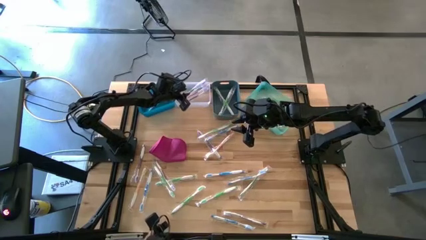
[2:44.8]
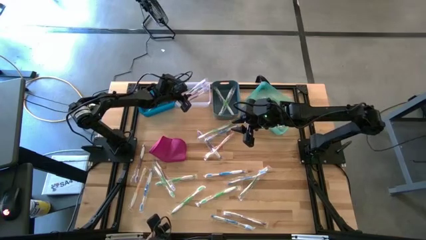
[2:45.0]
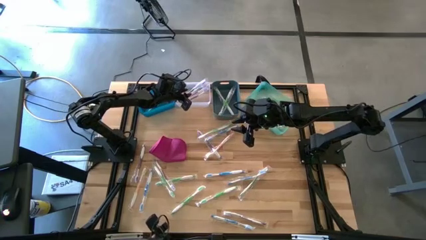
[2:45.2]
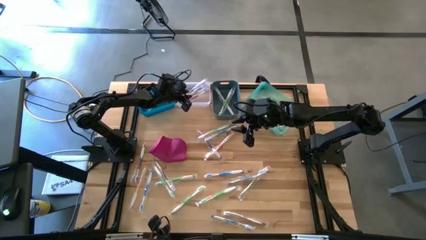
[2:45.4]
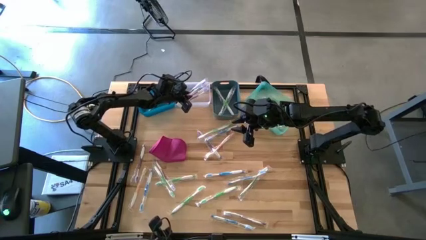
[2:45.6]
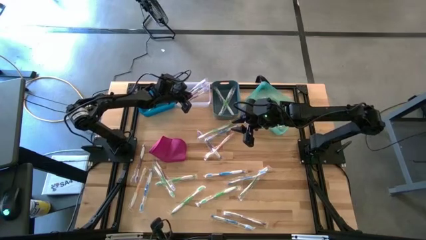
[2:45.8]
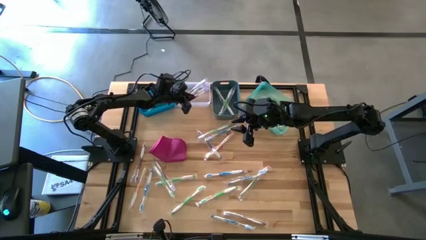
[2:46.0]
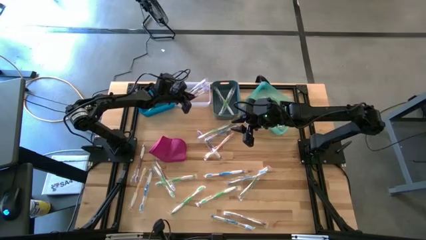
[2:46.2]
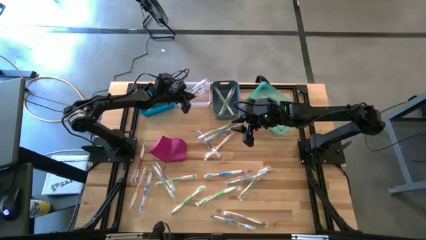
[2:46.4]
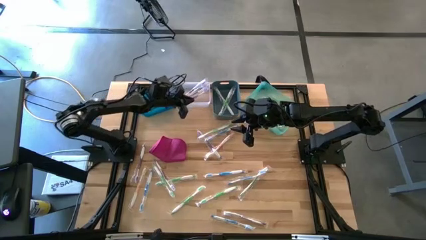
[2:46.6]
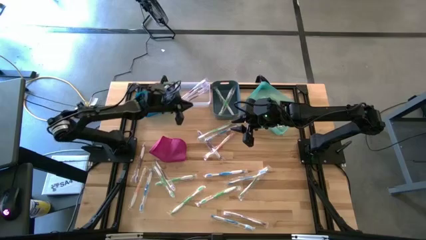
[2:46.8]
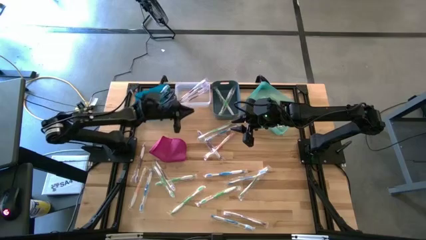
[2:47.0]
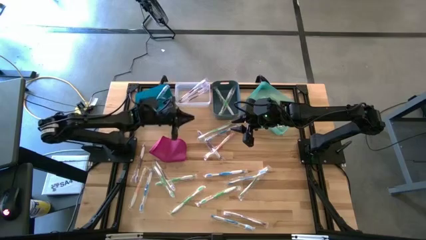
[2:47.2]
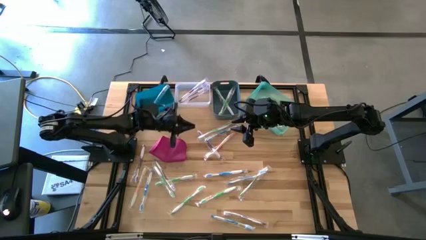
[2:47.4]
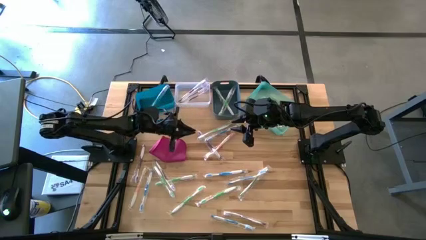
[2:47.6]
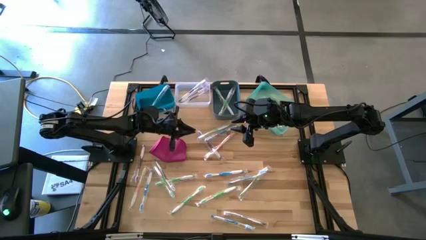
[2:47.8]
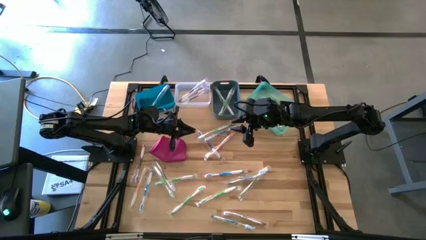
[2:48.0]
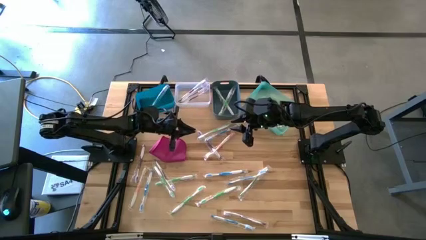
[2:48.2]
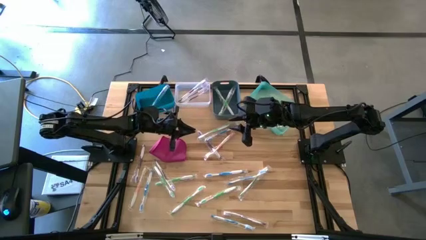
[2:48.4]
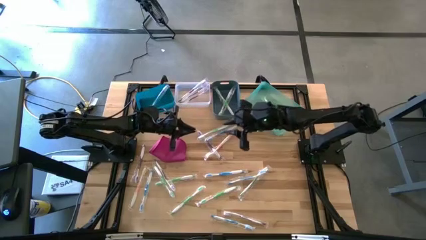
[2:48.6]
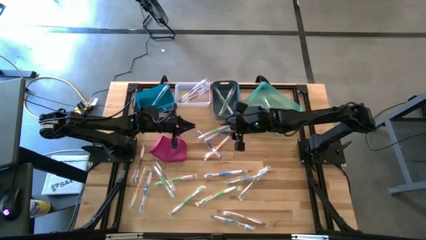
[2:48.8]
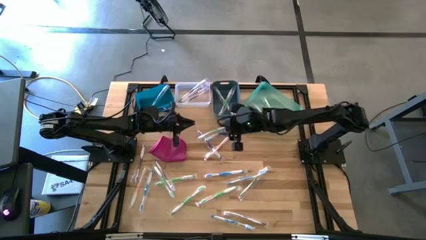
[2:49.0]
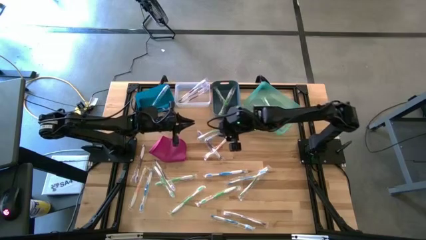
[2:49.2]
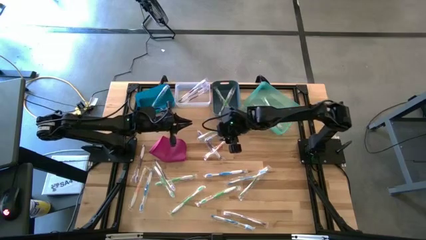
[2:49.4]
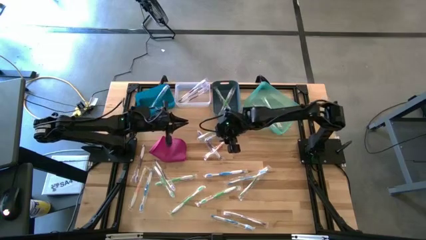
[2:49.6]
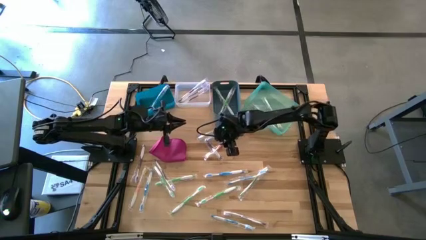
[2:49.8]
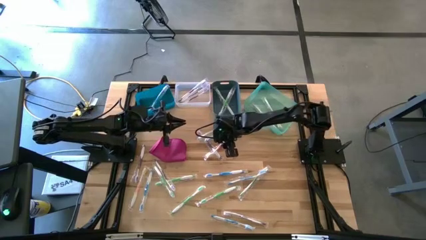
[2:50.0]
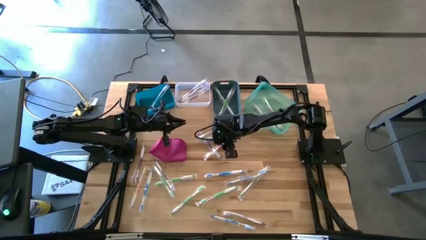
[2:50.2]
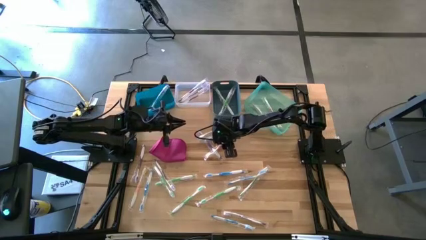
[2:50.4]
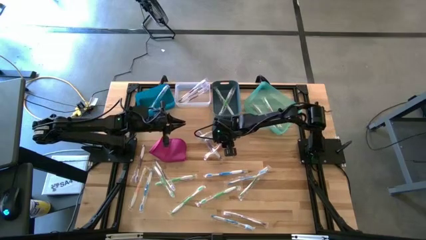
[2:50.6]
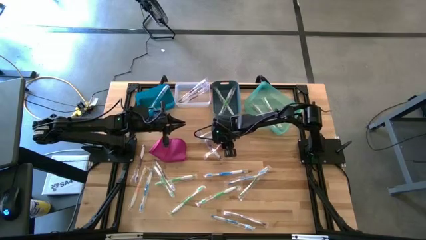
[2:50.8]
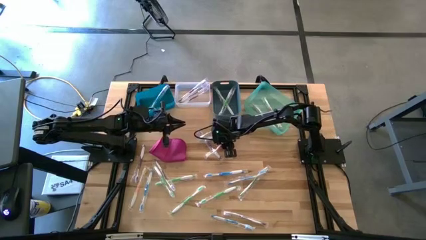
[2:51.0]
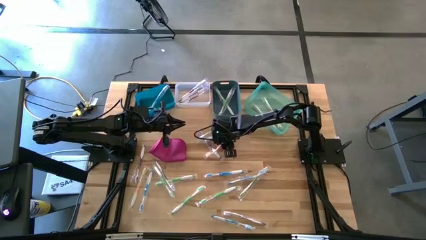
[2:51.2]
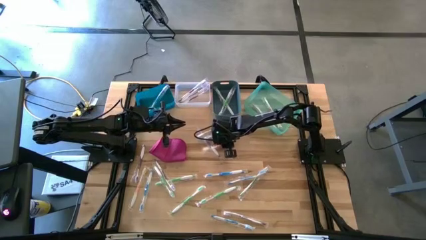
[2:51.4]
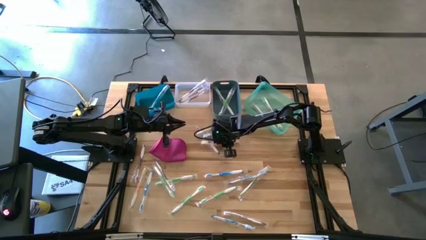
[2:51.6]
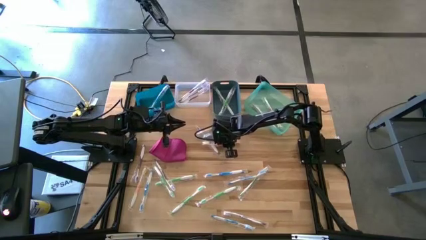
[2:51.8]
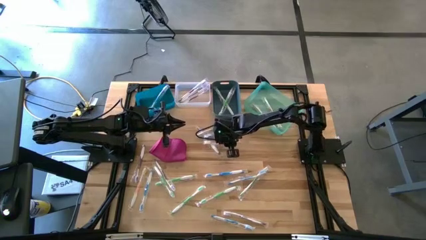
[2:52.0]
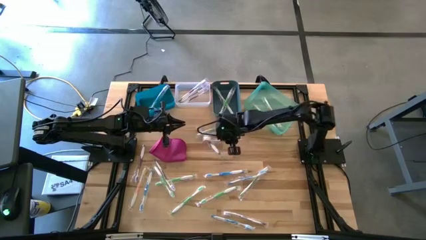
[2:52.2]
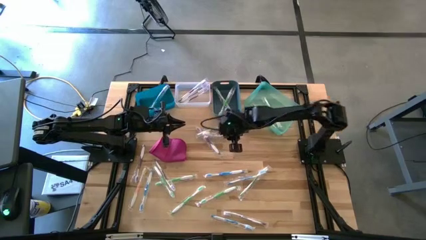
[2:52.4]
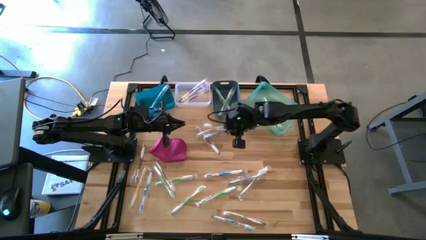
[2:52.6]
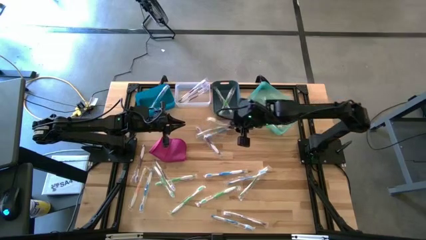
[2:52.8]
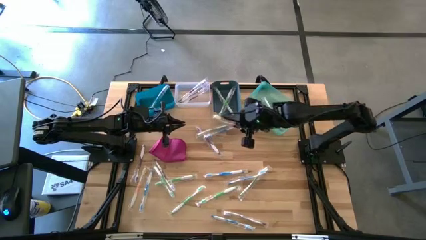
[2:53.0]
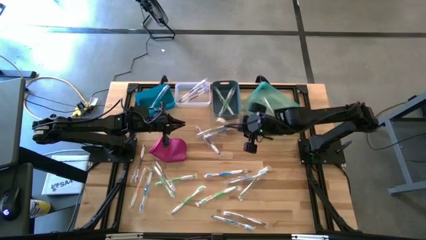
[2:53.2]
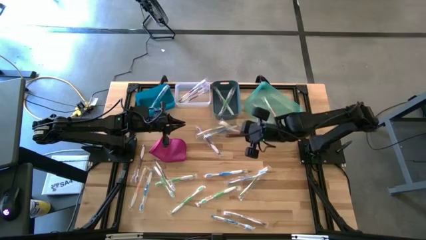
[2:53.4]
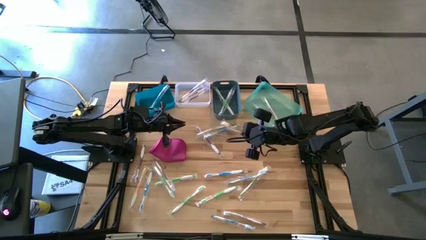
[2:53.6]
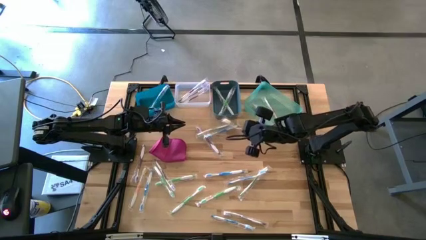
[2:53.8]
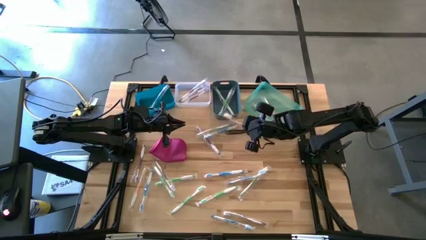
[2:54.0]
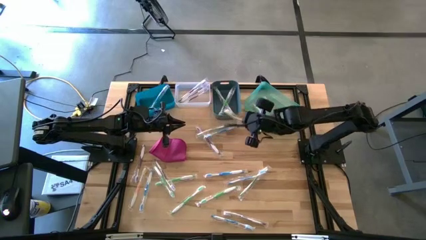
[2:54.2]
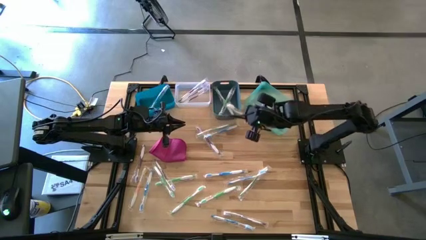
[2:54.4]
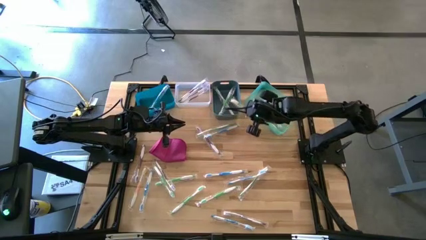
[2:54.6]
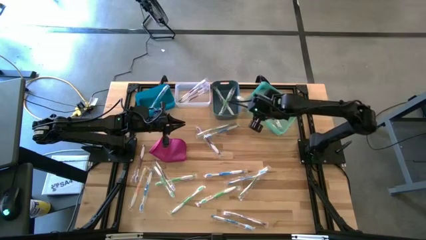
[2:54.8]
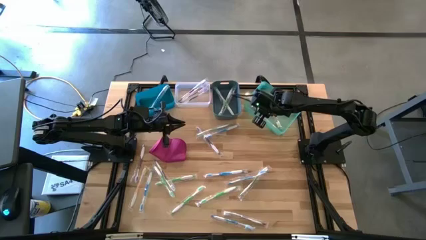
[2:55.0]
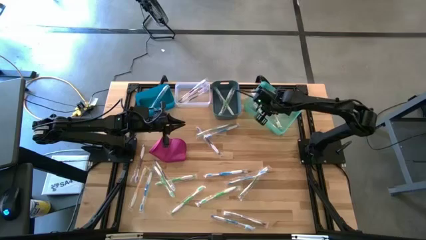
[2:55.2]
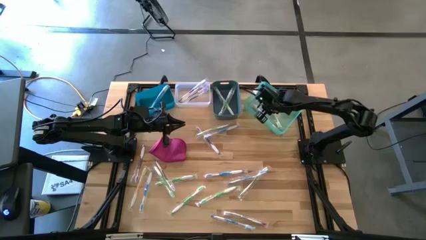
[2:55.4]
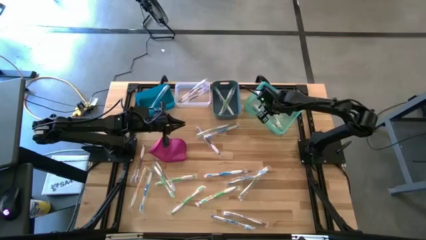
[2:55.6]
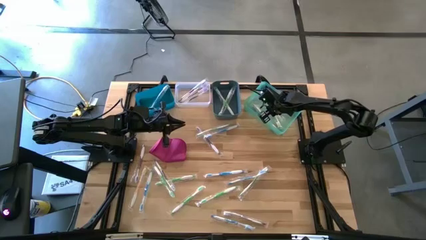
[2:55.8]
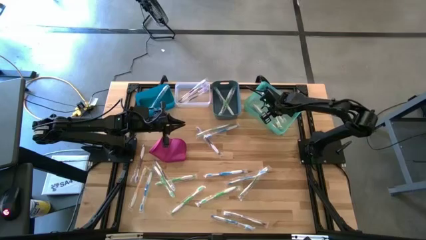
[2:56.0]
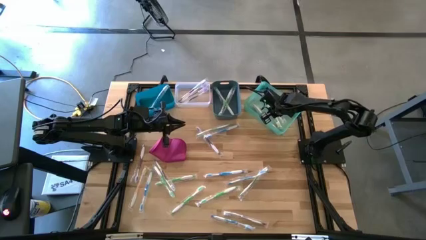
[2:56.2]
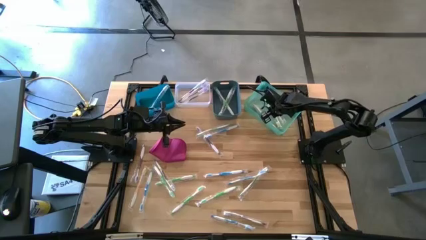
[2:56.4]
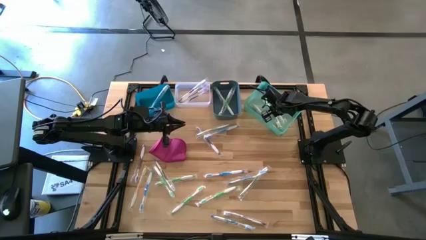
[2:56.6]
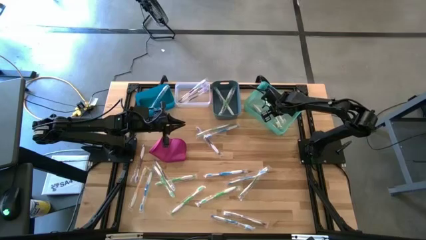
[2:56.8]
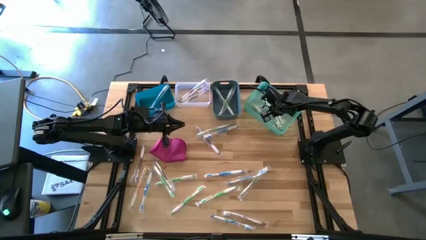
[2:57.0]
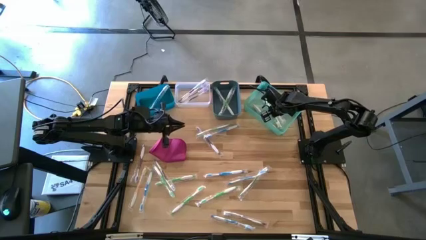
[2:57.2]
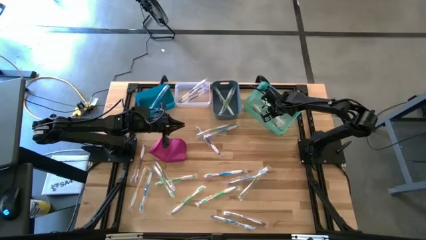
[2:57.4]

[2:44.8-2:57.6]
Task: Pick & Place Toothbrushes
Put the orange toothbrush into the light blue bin

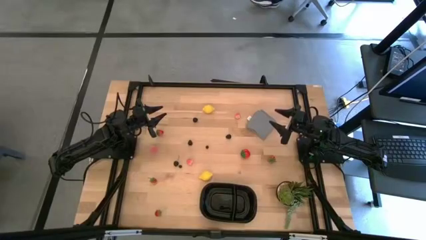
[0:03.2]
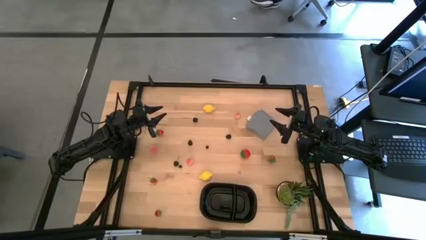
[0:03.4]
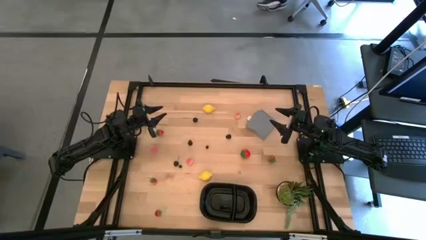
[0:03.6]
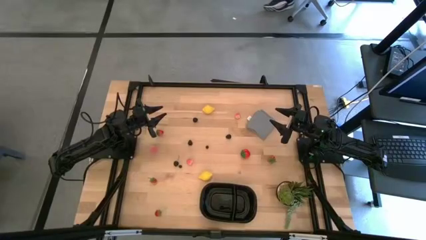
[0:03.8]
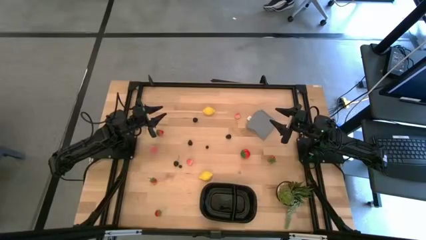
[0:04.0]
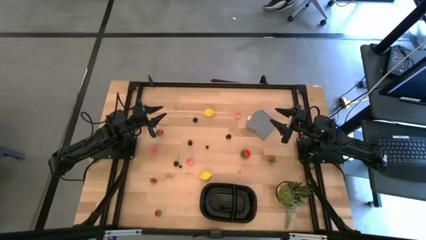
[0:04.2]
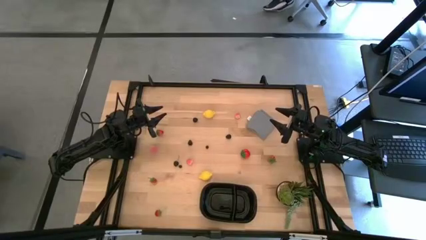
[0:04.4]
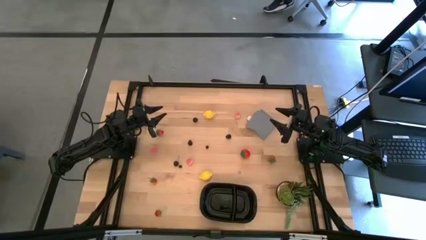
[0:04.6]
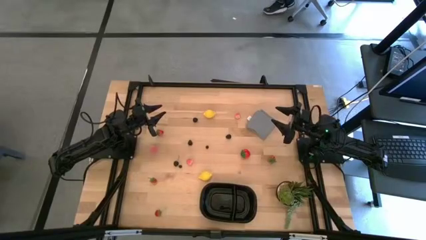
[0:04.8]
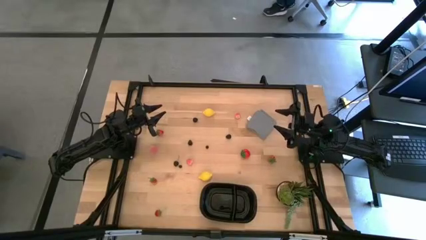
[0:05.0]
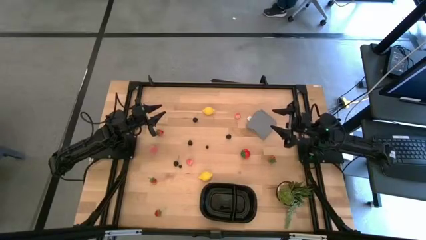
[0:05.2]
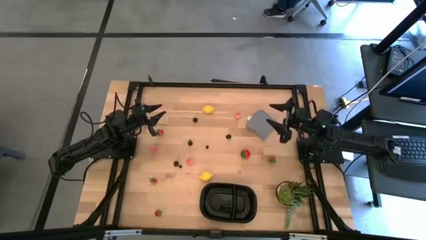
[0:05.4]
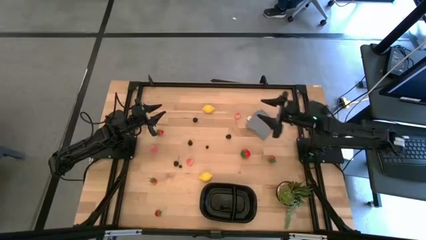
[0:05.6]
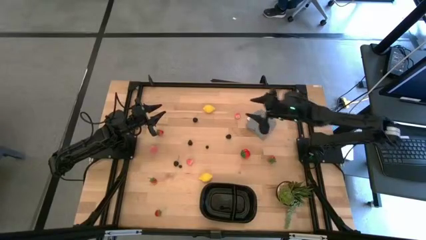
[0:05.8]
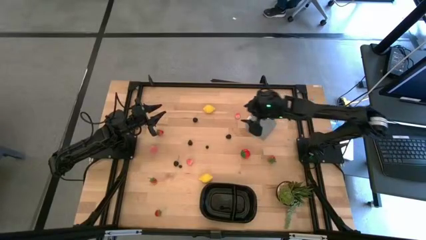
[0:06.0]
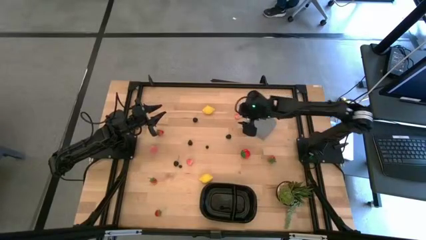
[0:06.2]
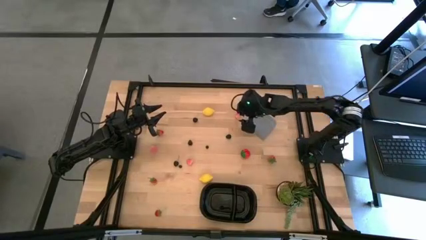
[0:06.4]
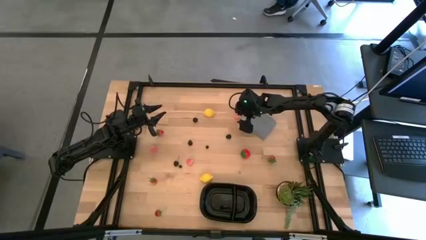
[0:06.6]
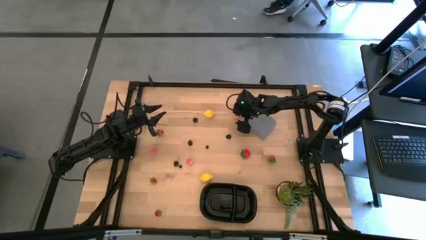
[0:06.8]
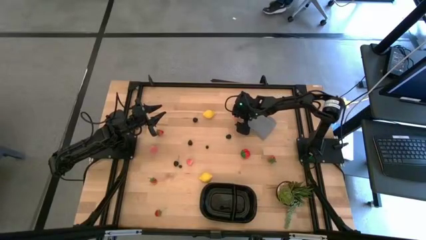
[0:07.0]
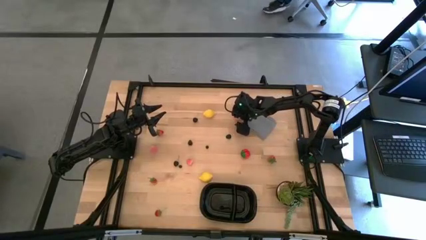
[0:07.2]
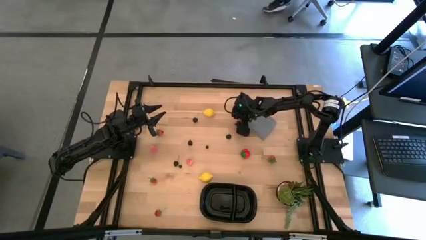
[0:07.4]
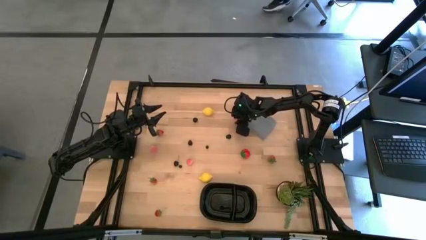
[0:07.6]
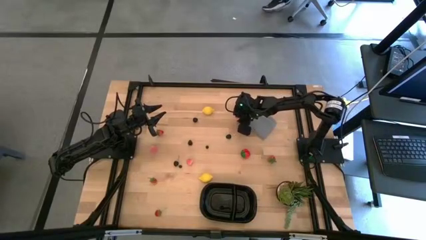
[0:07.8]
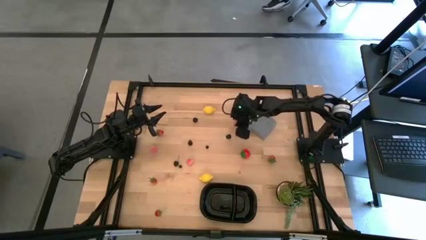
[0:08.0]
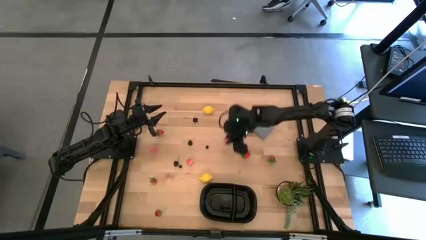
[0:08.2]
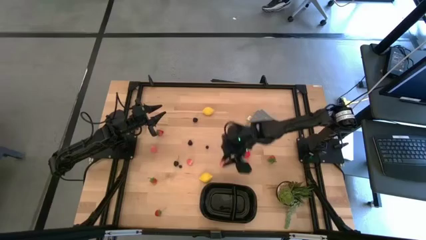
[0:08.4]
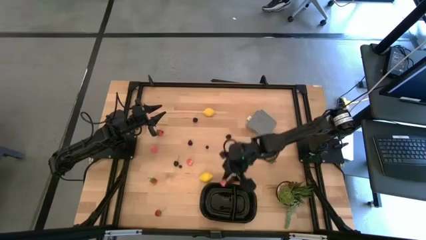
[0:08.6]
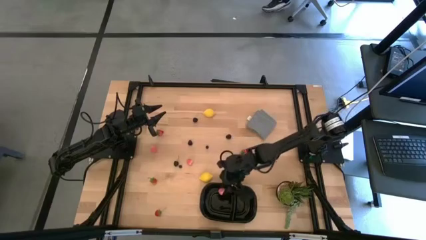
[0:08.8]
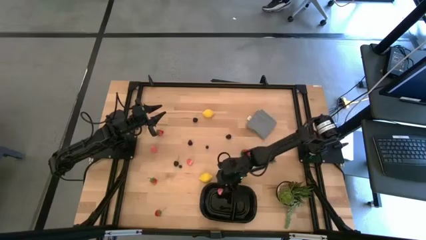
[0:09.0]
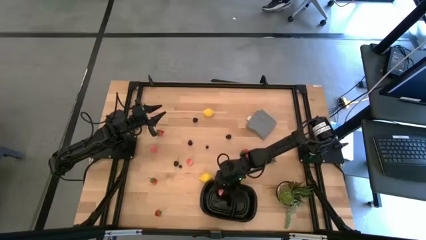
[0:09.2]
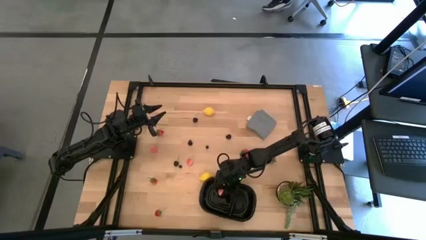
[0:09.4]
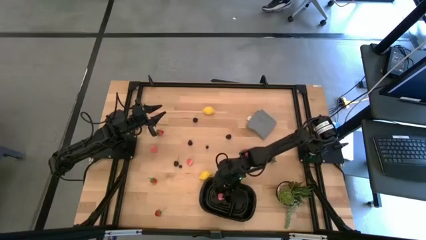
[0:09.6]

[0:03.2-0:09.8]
Task: Pick and placing Produce into tupperware
Put the peach into the black bin
